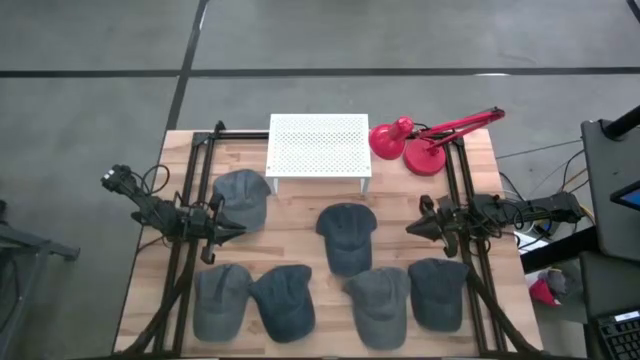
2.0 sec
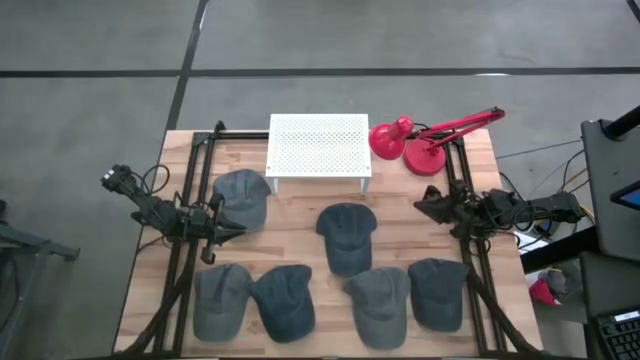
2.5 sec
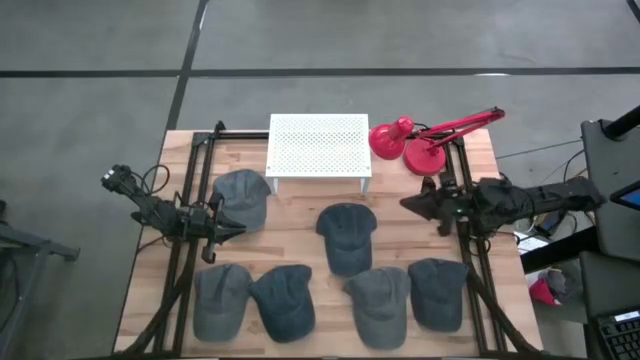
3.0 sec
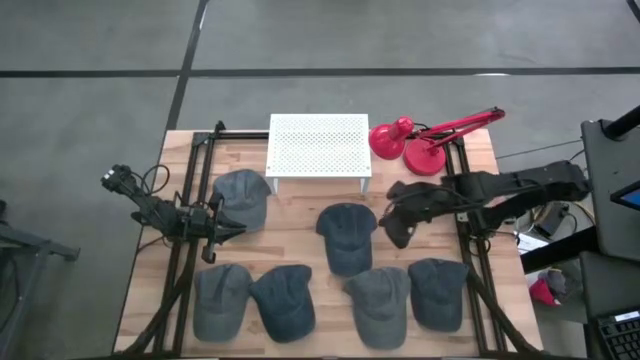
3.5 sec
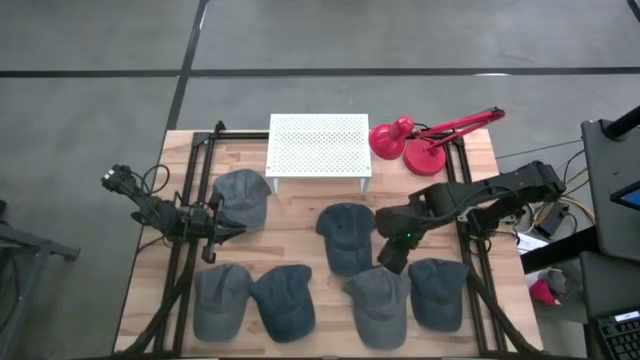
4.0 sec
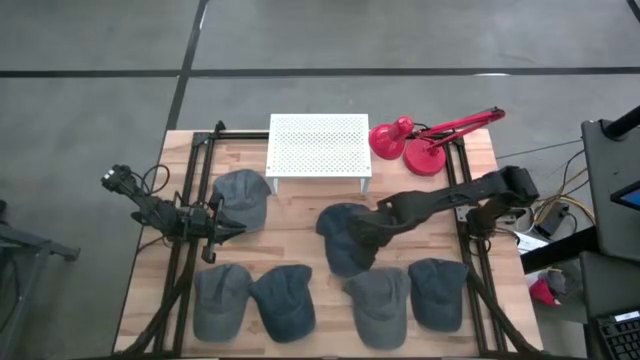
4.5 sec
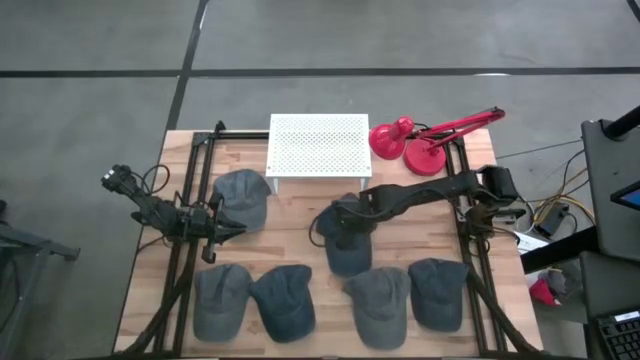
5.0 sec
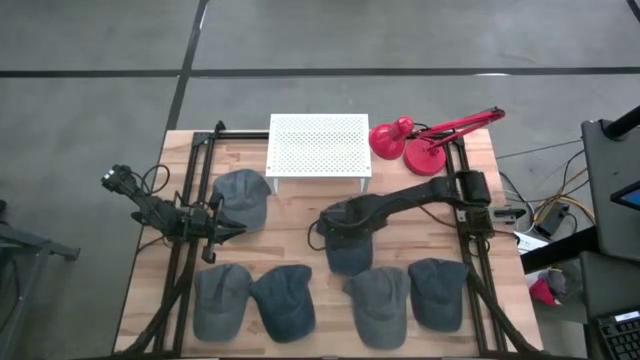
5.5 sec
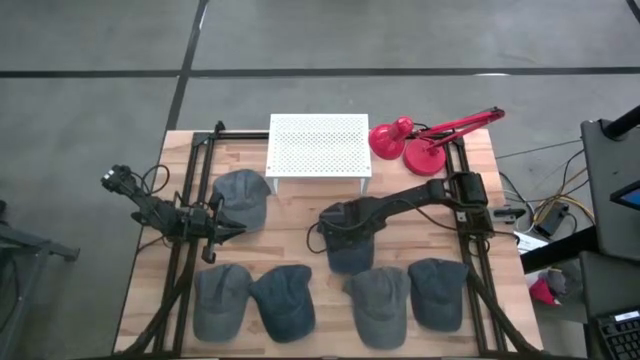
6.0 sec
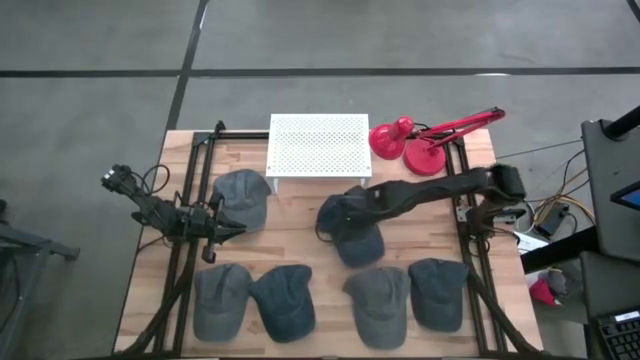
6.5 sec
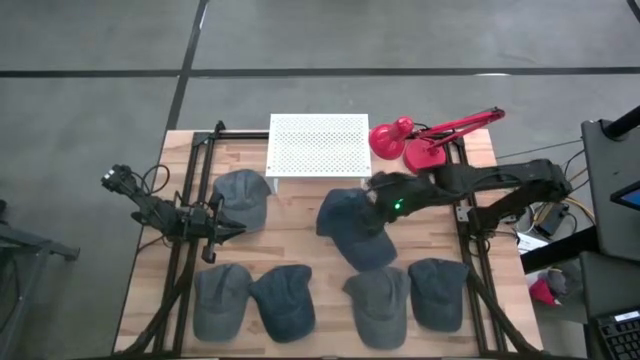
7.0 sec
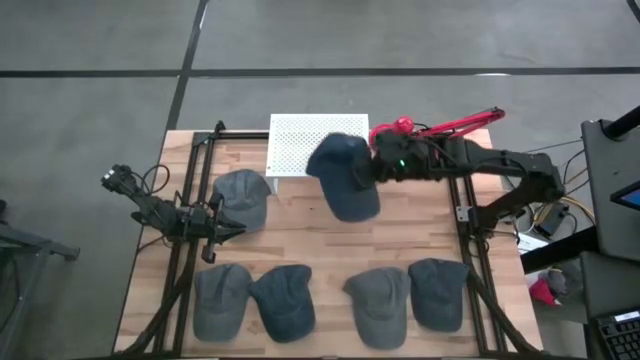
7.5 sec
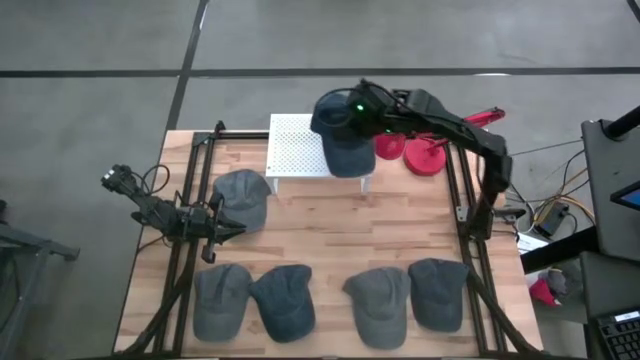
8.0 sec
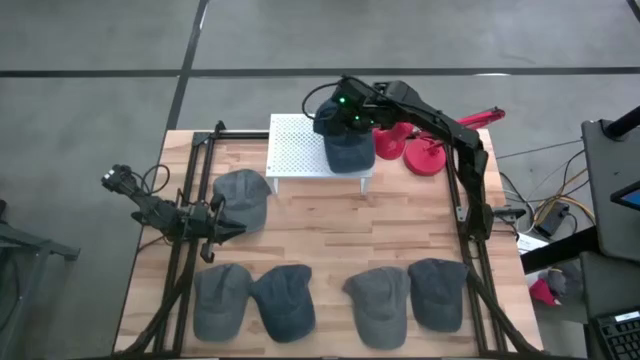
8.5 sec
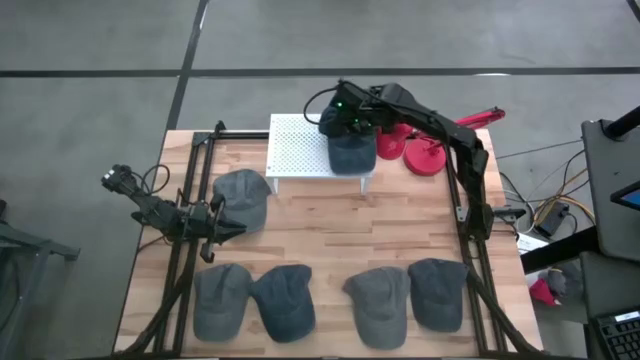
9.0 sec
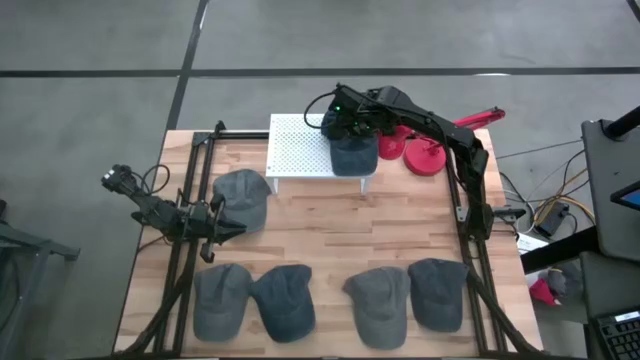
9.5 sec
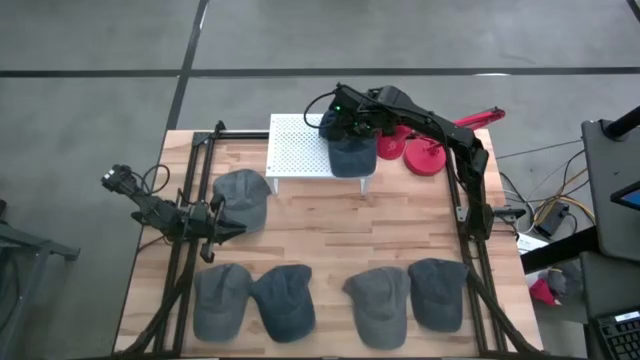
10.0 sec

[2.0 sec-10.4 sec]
Task: Pick & Place hat
Put the top blue cap on the shelf

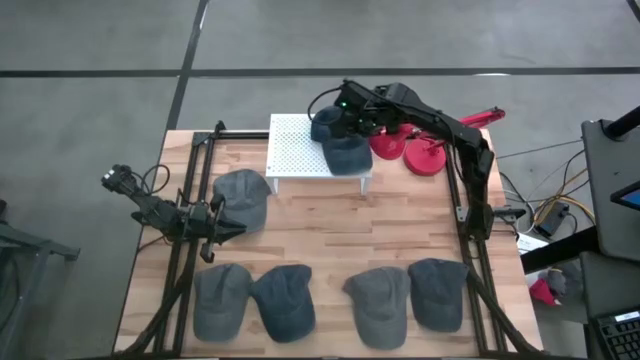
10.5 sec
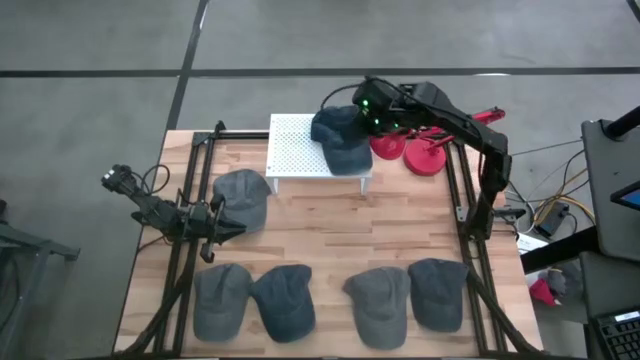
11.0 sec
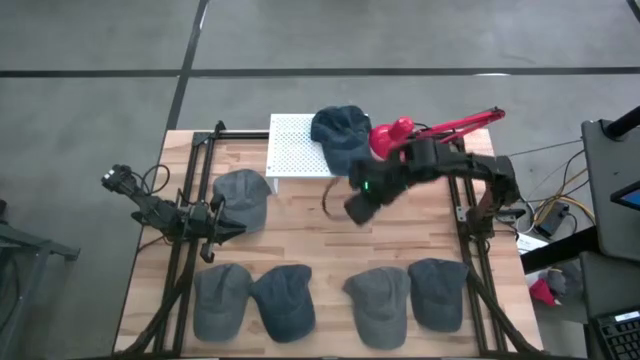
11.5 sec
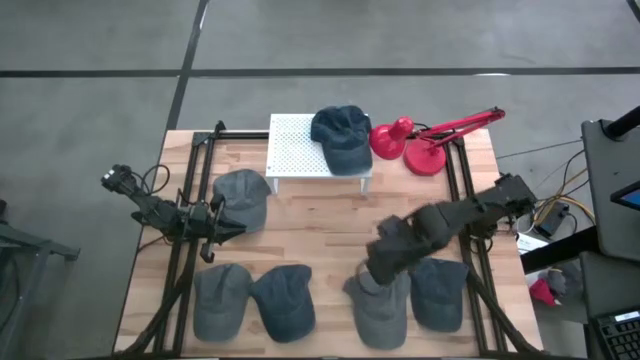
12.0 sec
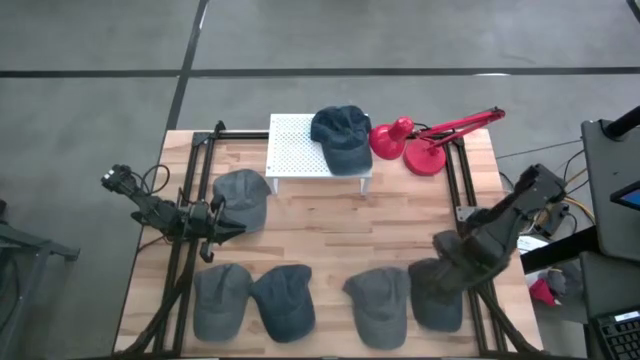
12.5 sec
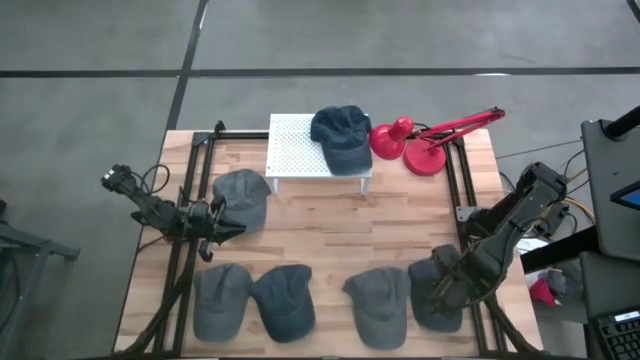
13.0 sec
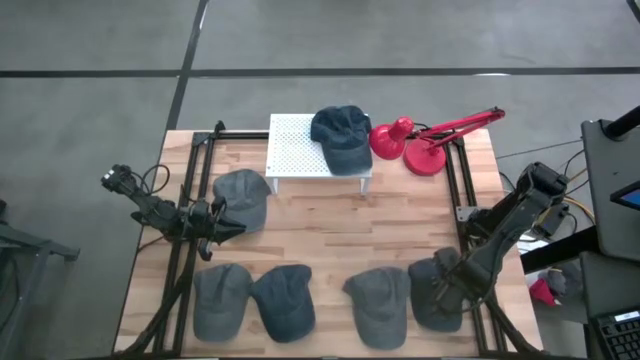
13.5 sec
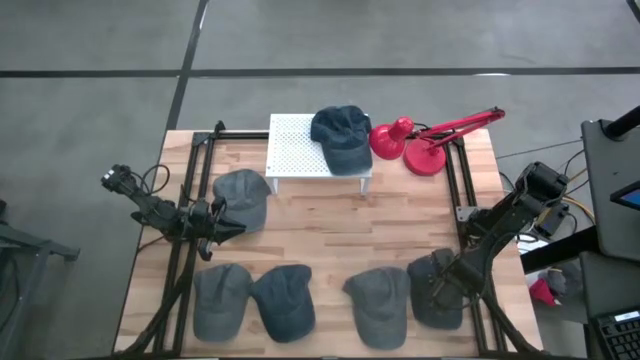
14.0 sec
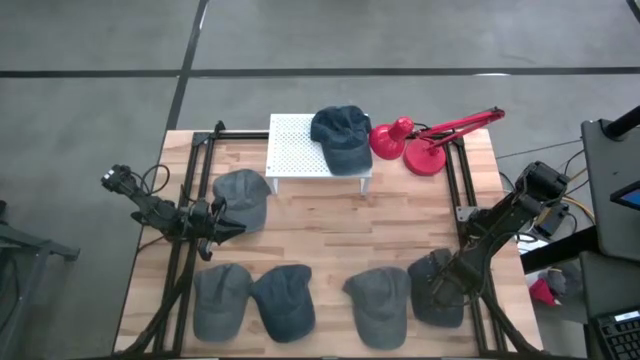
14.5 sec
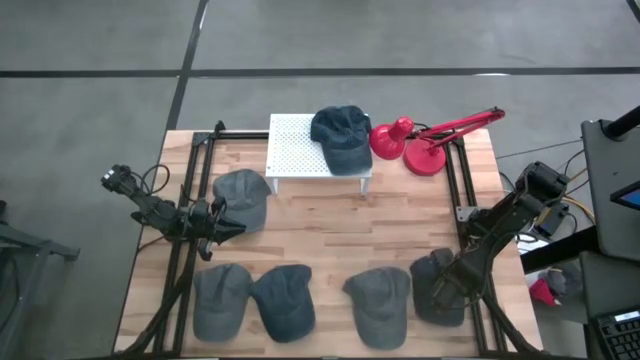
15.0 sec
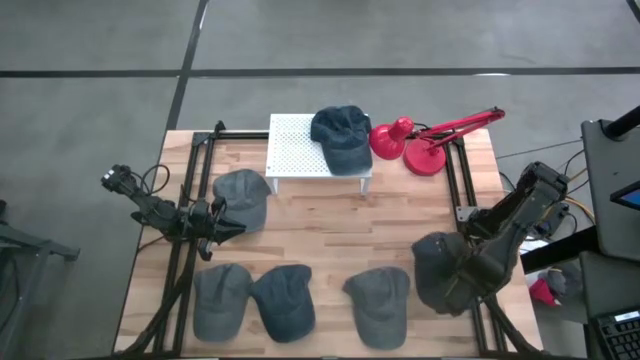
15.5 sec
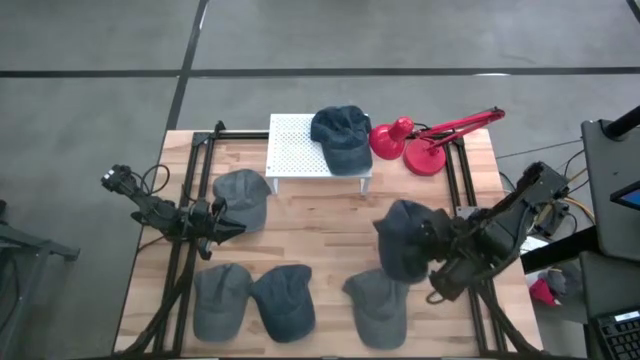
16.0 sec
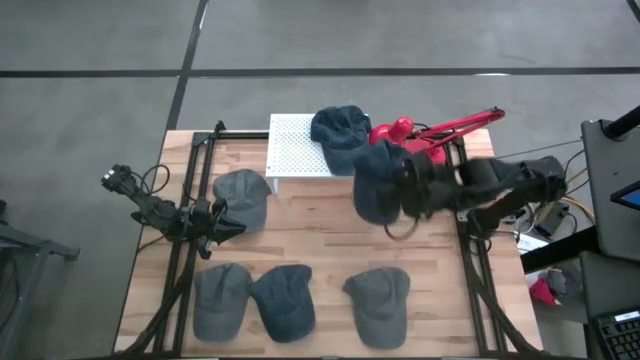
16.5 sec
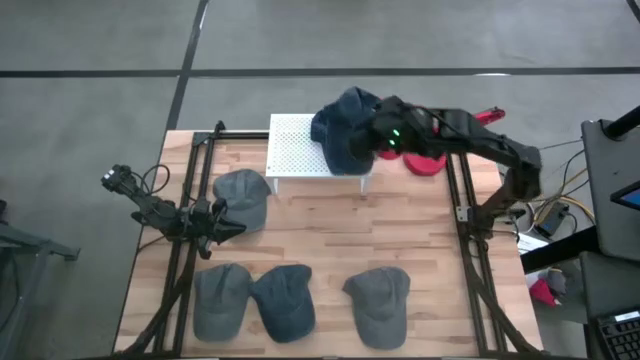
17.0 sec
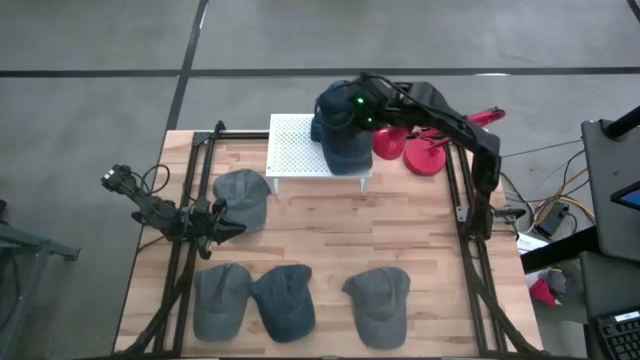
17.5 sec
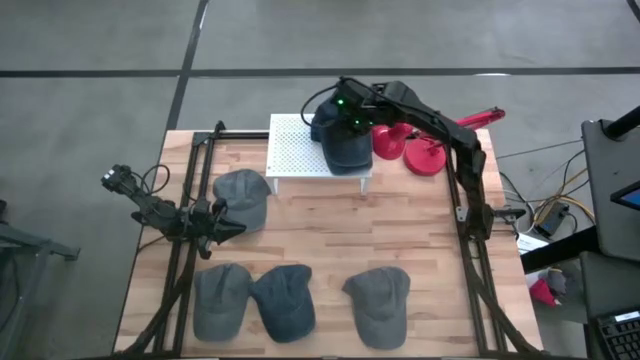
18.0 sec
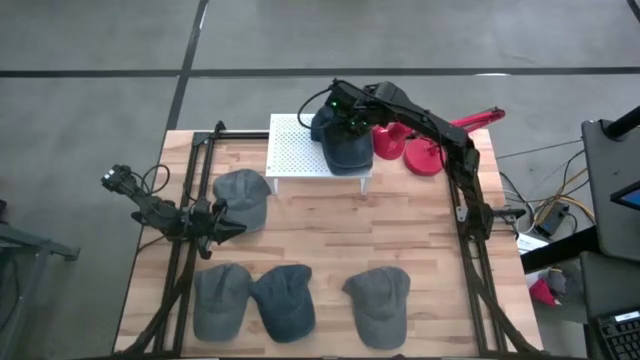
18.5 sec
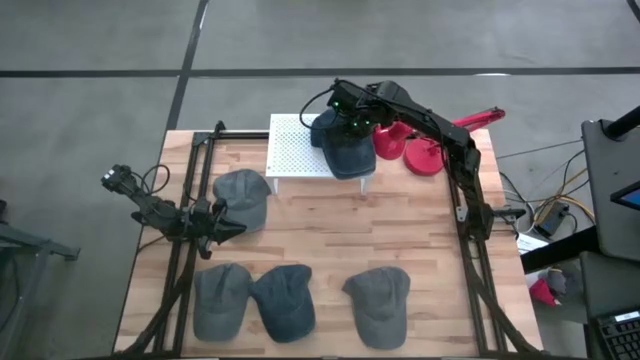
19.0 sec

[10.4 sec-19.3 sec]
Stack the right blue cap on the blue cap on the shelf

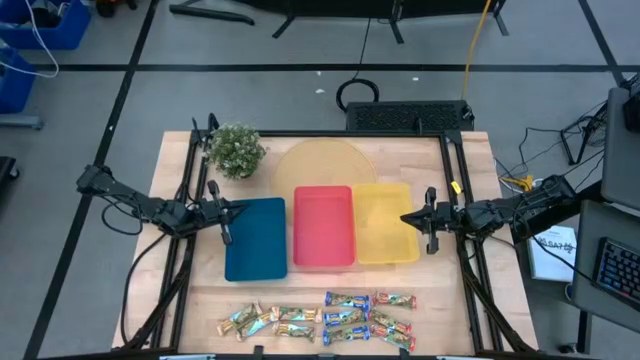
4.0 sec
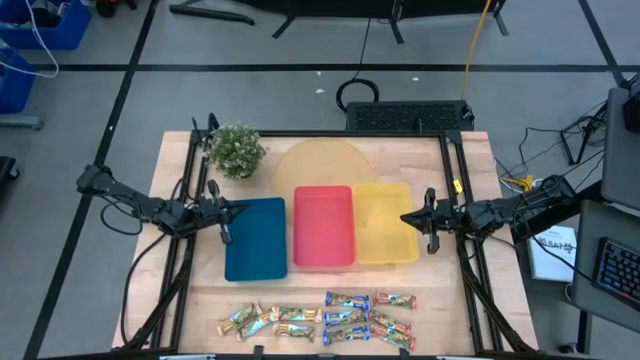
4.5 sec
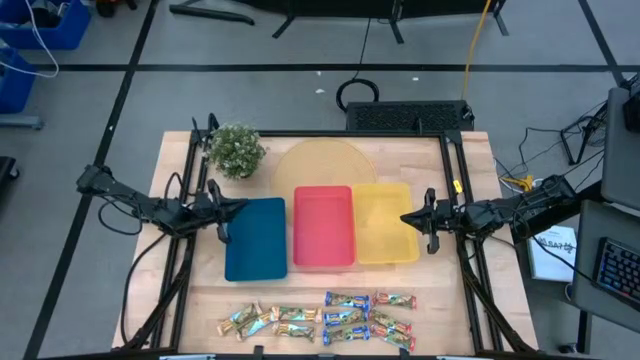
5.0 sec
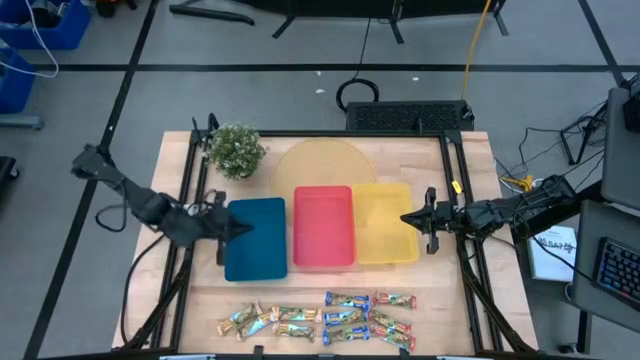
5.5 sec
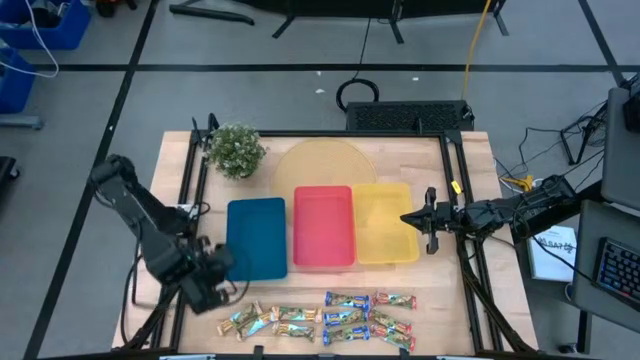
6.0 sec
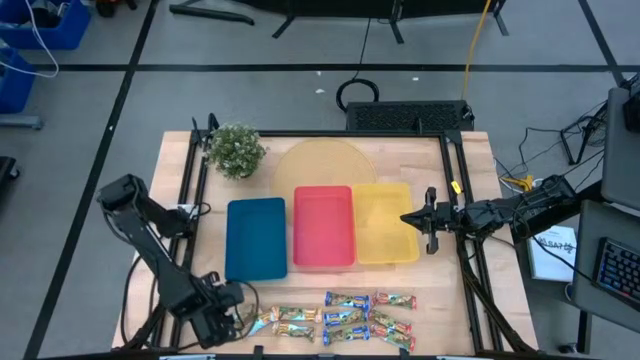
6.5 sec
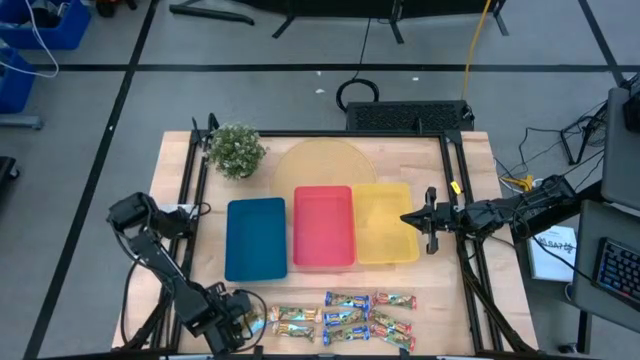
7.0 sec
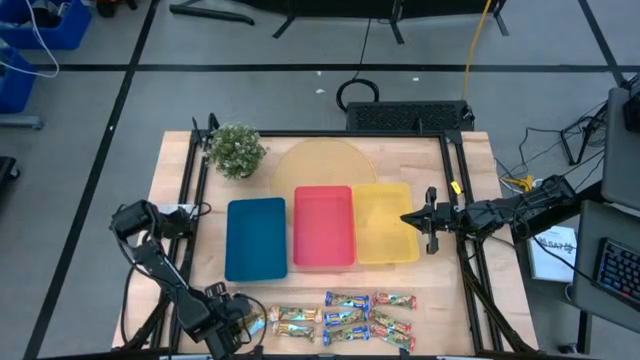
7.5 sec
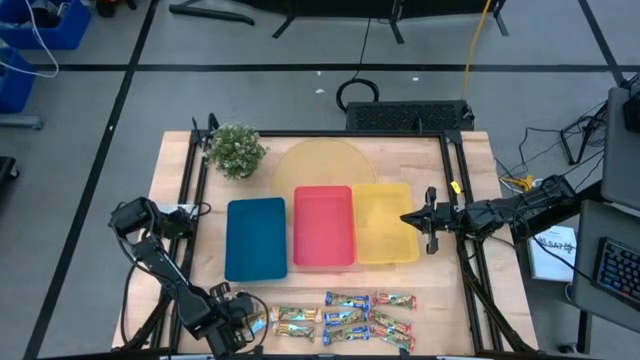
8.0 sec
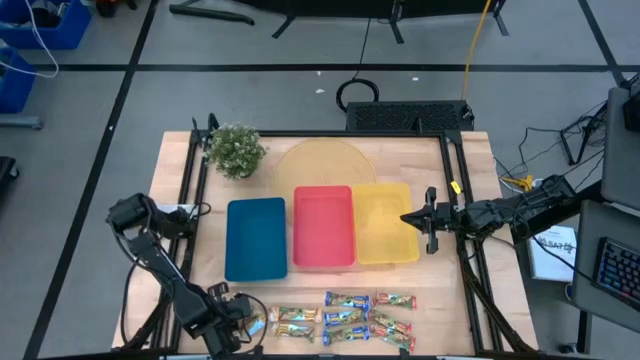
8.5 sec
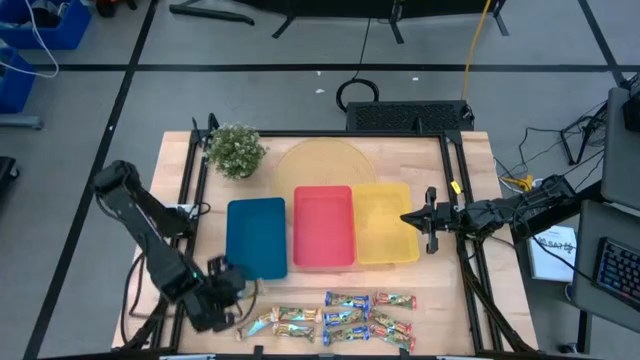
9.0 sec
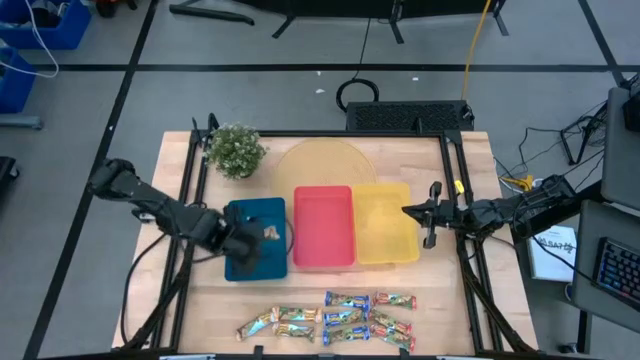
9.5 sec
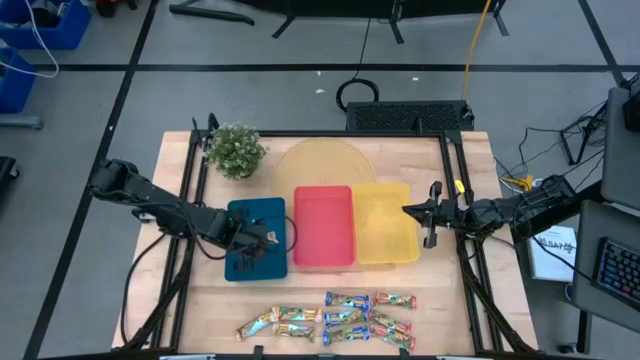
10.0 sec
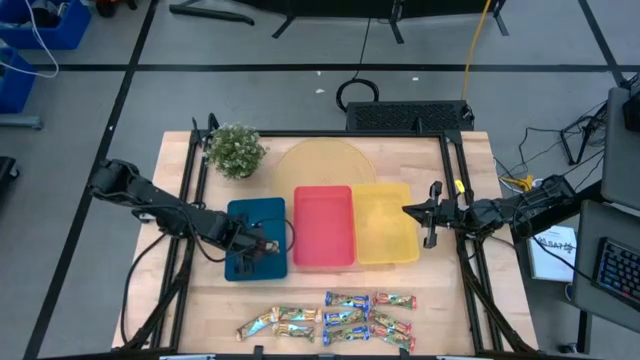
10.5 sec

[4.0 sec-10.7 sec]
Task: Pick and place Granola Bars by type
Put the yellow granola bar into the blue bin
